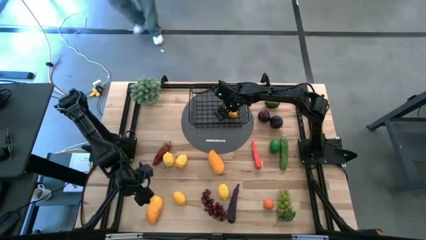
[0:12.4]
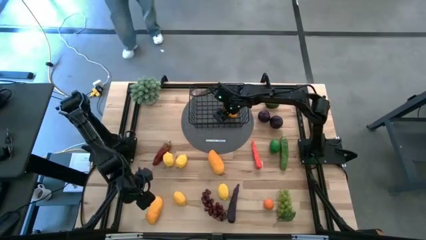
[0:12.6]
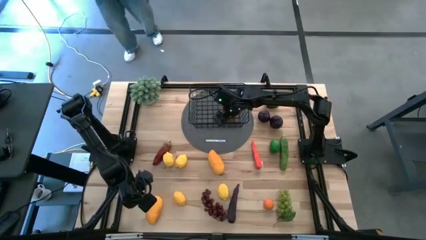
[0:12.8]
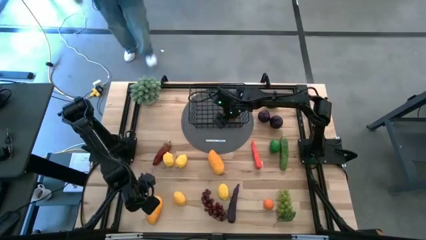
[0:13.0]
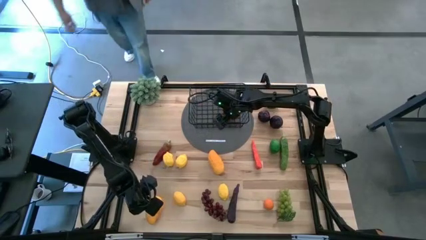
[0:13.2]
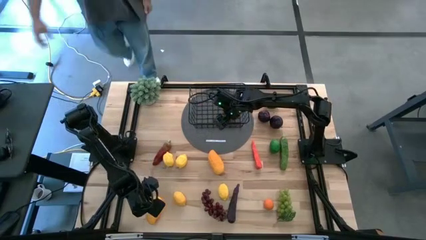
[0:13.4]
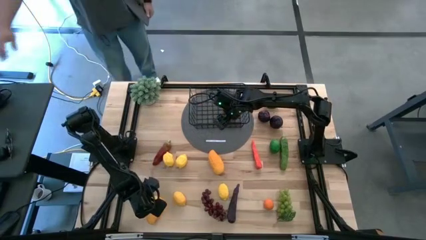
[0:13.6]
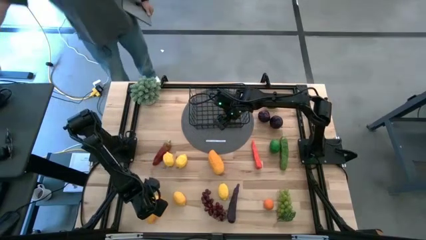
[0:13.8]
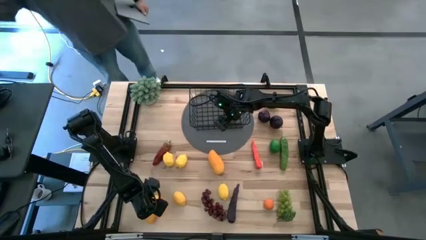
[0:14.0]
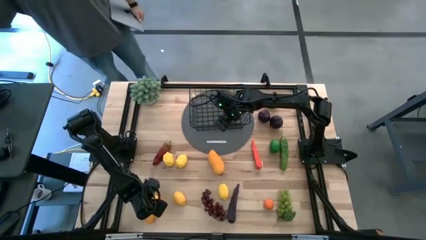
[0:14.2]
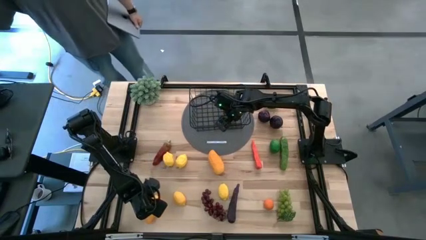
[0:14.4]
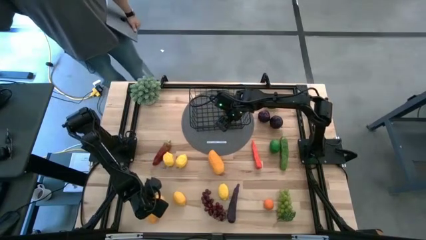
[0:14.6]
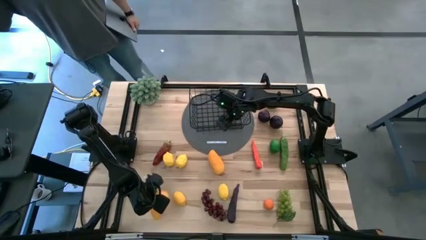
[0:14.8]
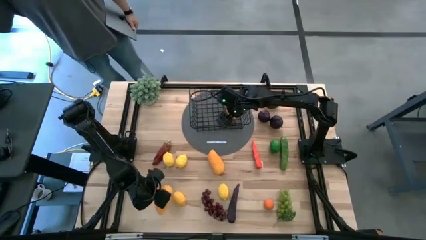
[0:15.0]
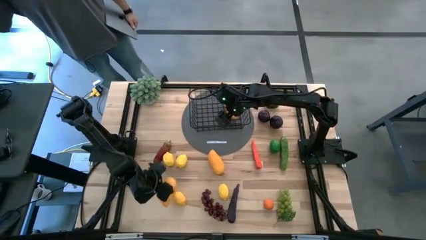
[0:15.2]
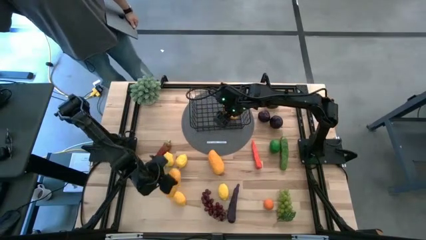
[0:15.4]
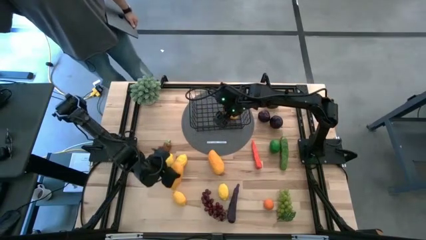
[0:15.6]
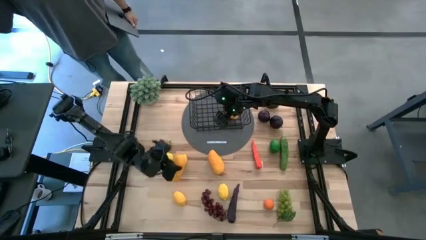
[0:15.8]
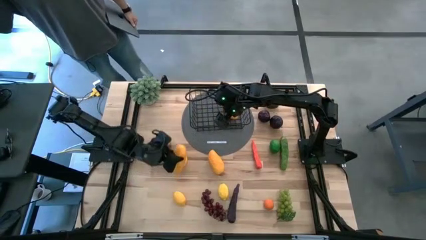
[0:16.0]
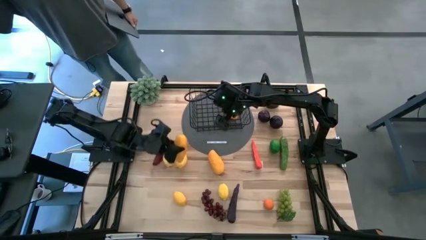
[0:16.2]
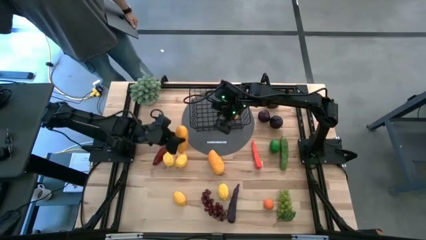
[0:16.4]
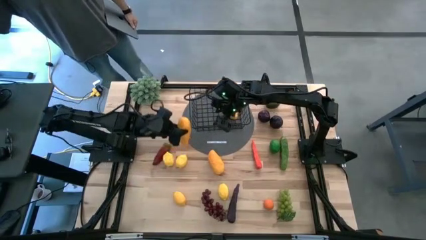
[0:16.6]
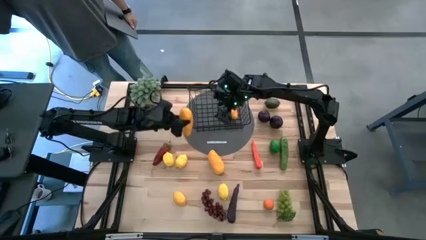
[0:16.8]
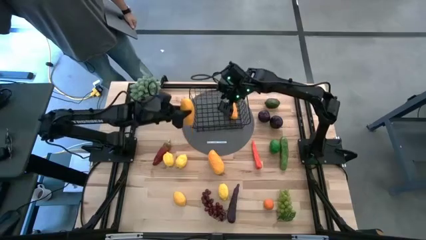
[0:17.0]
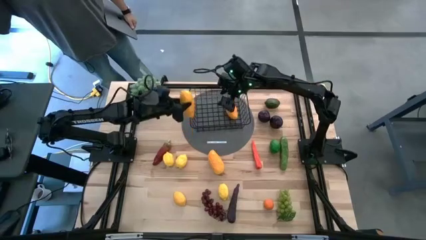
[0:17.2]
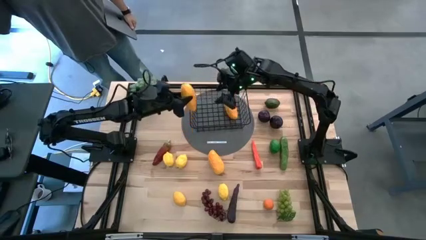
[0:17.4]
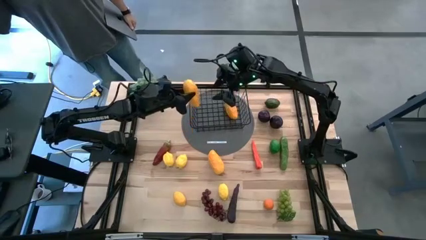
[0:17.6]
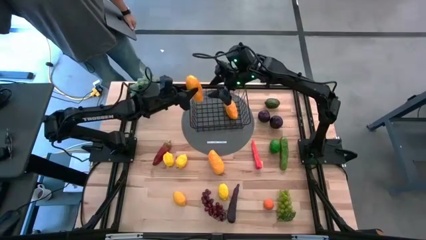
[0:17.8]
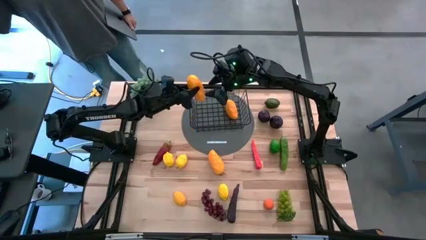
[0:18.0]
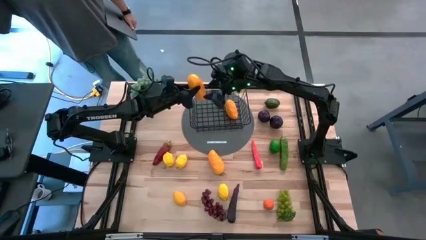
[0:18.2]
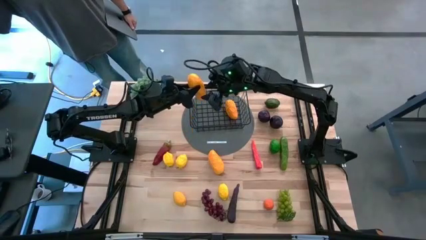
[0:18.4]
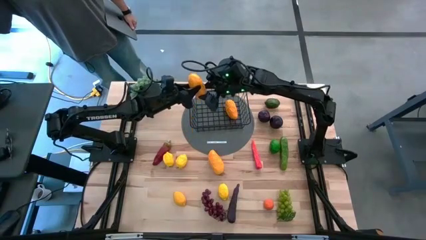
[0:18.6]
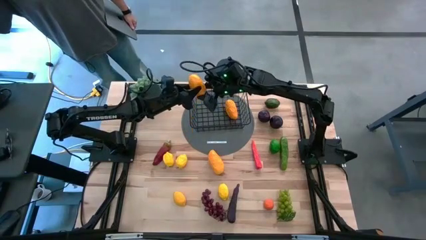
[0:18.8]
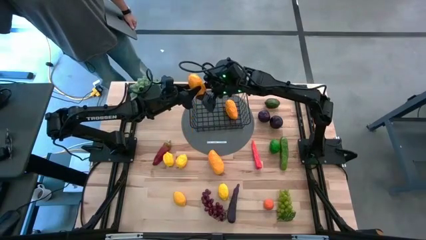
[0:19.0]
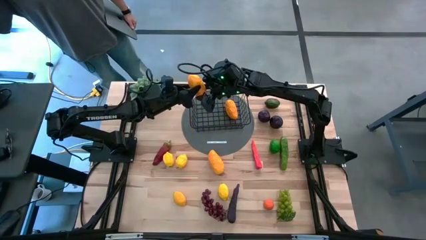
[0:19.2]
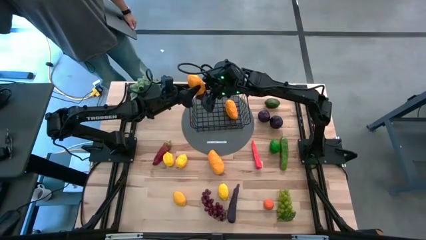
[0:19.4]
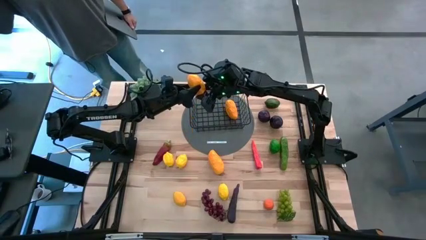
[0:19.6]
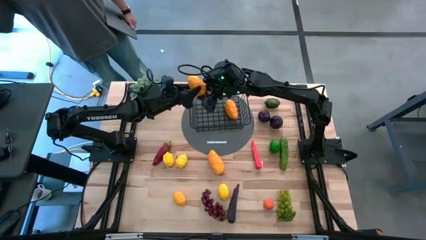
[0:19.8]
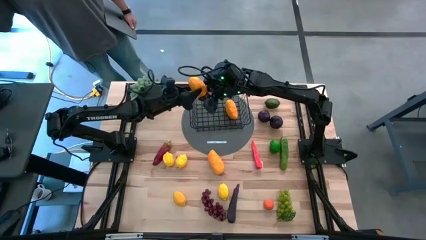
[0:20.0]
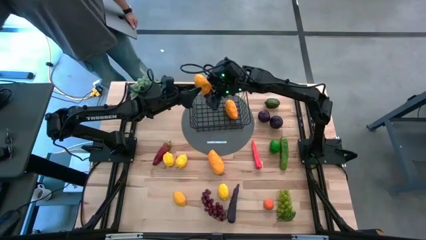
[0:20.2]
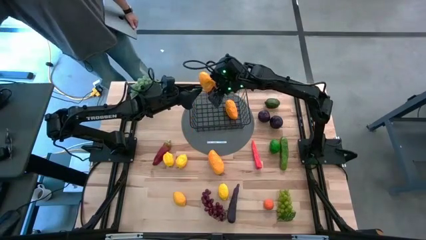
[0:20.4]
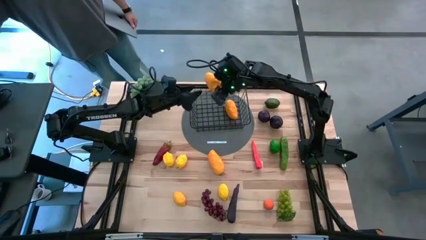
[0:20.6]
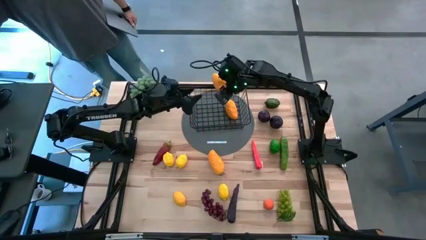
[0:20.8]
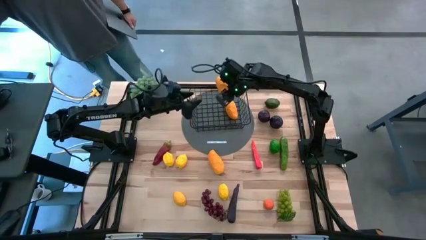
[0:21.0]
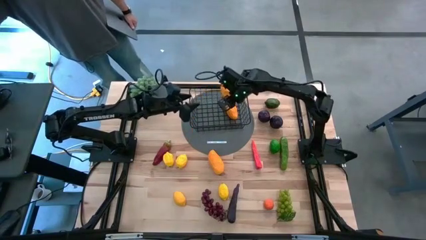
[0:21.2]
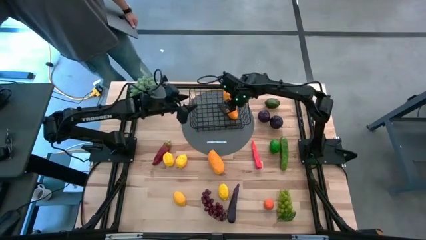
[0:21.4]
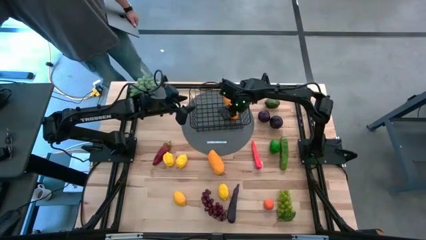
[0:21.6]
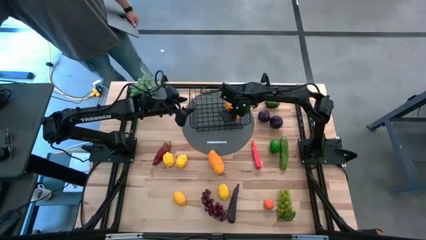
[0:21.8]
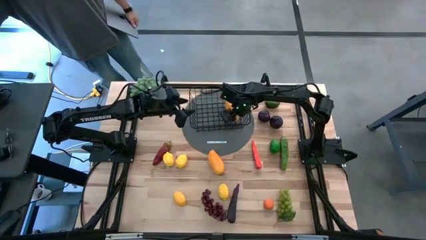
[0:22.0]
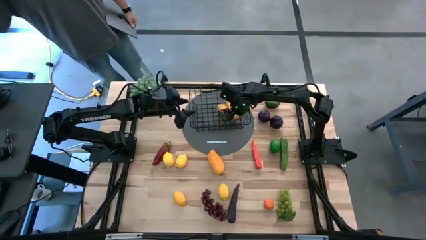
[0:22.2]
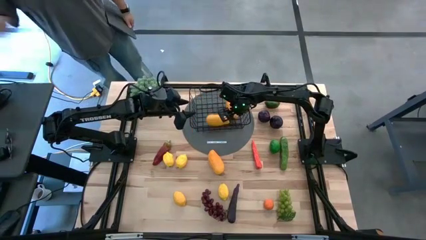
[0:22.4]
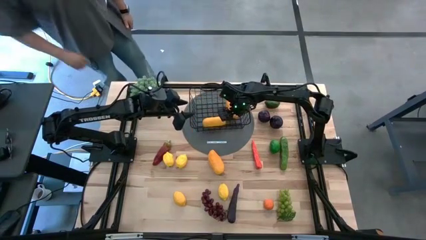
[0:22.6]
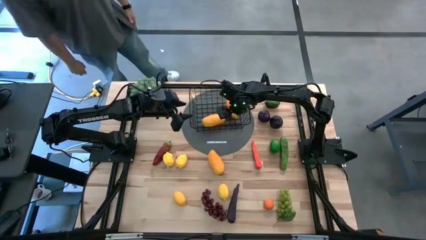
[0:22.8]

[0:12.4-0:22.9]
Task: Build produce basket
Put the bottom yellow mango into the black wire basket

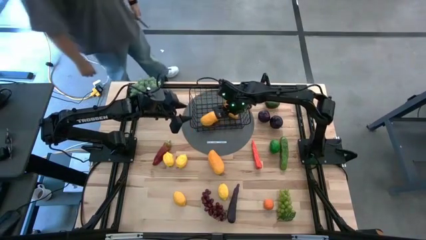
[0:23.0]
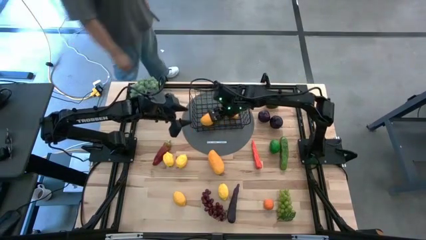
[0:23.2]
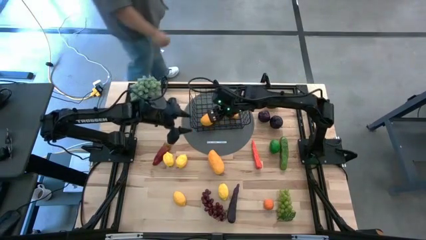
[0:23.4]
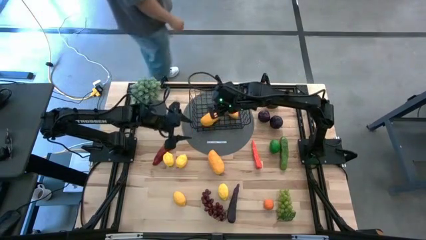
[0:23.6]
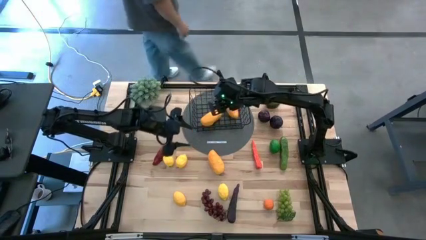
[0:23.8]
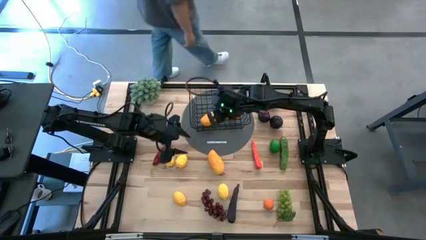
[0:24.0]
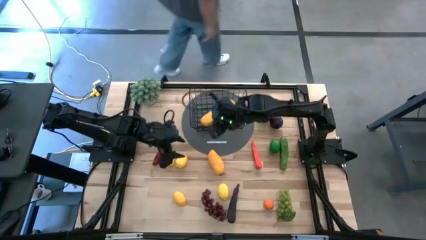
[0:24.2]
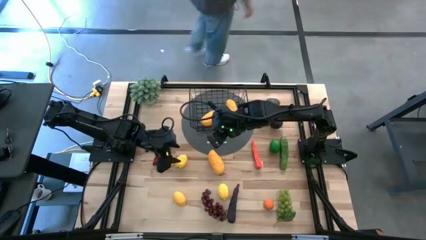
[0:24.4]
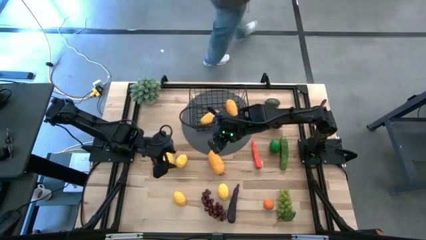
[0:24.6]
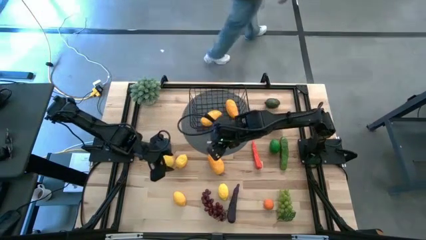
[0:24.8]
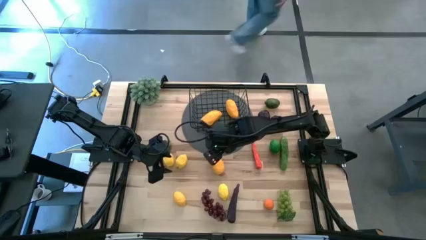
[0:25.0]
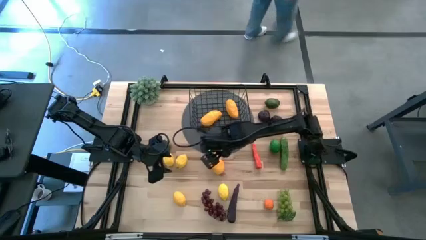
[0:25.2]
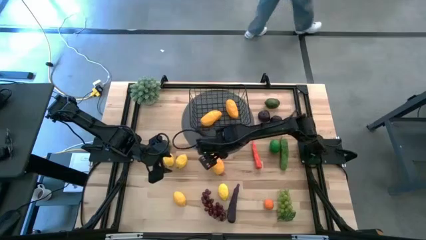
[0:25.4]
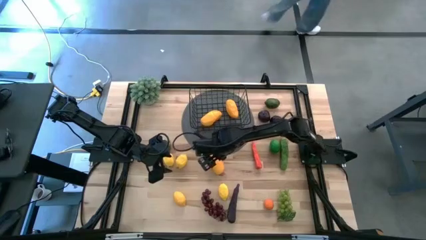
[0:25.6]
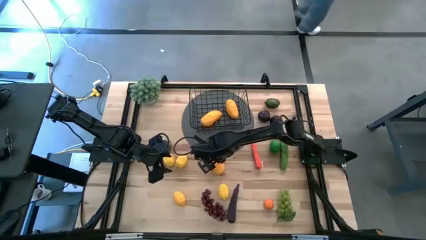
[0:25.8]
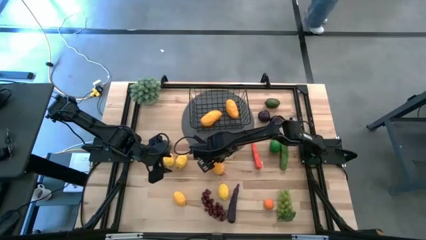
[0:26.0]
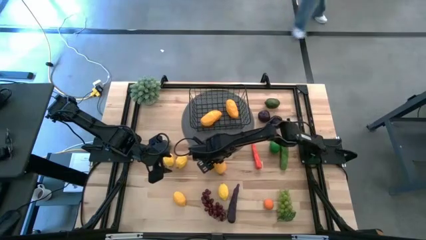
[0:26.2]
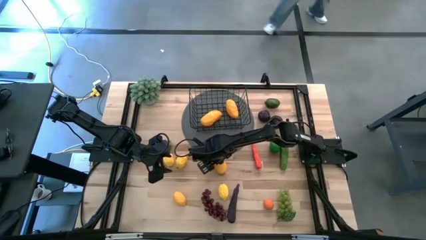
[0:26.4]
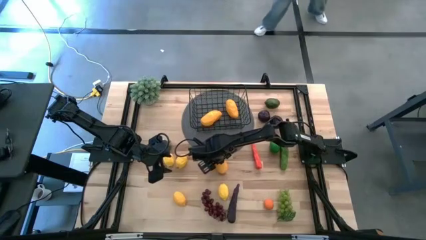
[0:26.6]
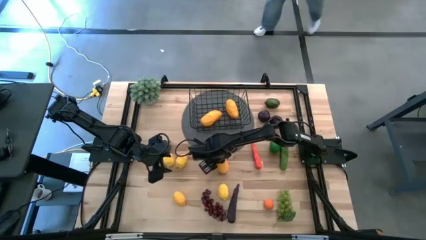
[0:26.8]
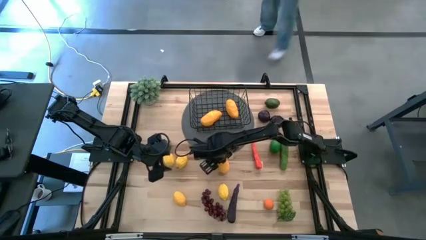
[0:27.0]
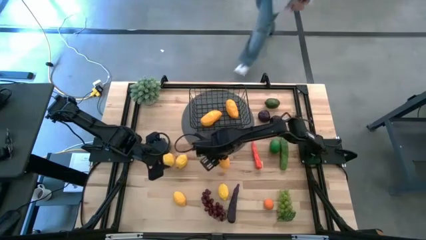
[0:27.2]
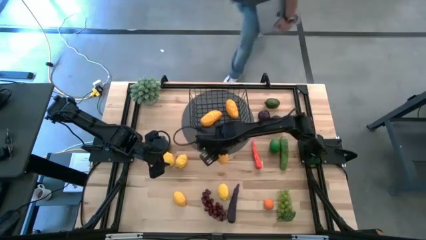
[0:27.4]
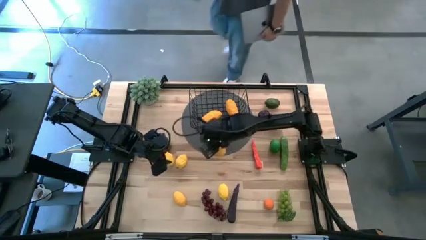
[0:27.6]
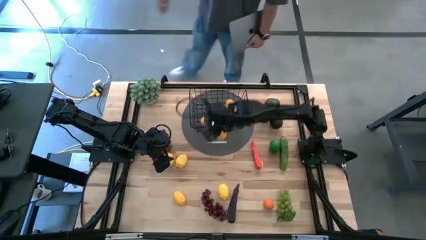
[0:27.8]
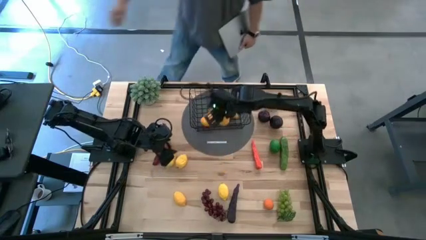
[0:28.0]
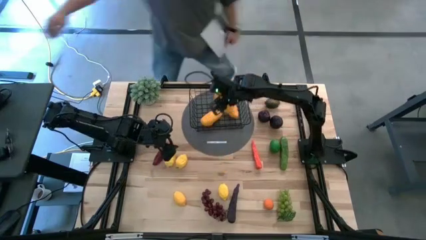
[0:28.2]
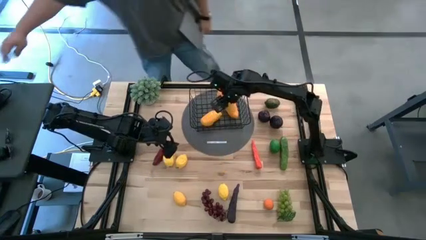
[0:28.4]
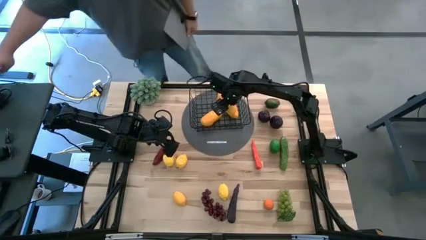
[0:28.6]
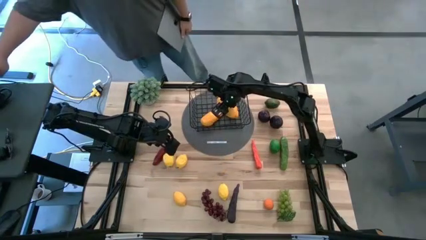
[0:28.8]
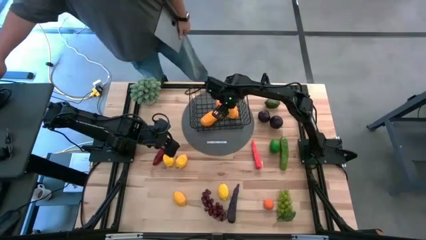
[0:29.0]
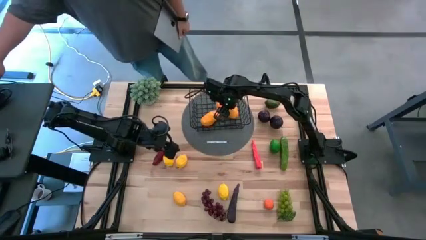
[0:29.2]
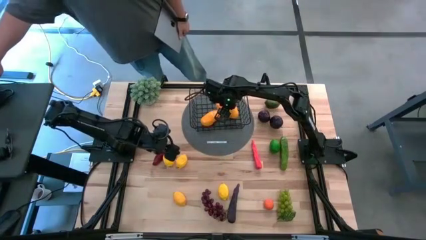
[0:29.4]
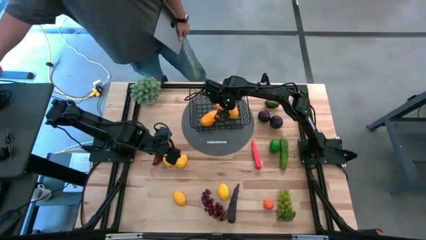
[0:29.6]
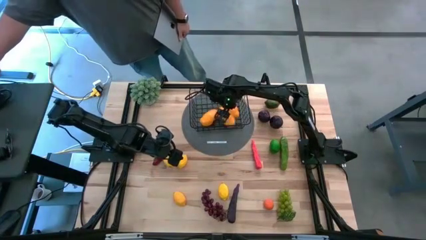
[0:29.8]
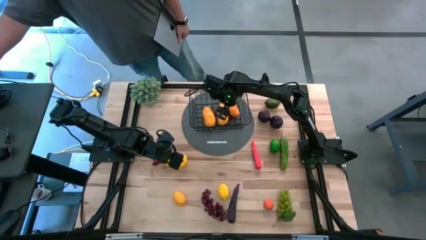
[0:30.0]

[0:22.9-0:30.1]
Put the yellow mango into the black wire basket
